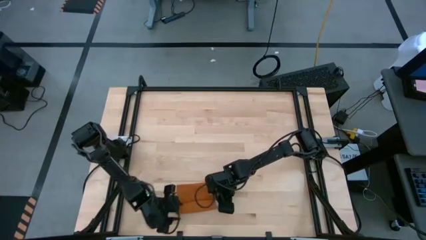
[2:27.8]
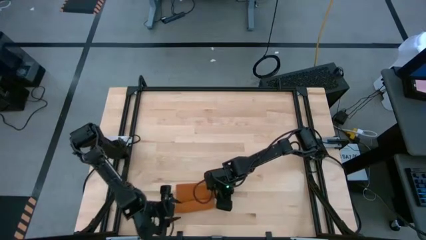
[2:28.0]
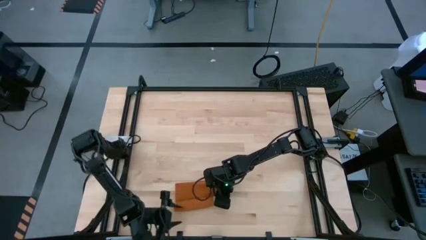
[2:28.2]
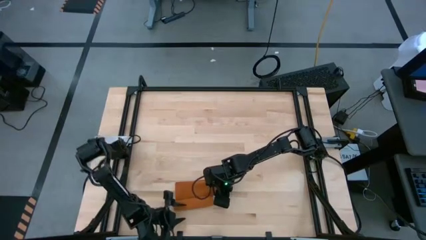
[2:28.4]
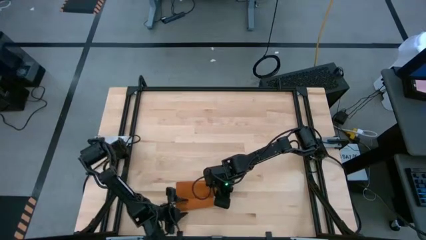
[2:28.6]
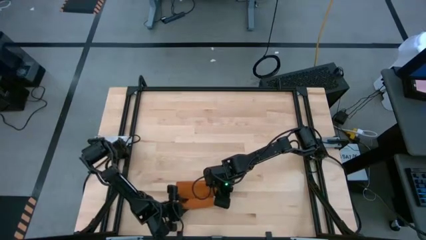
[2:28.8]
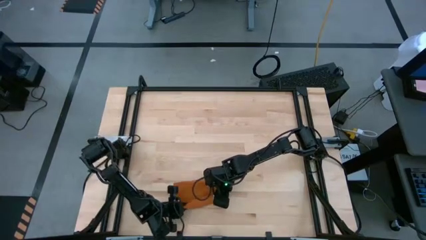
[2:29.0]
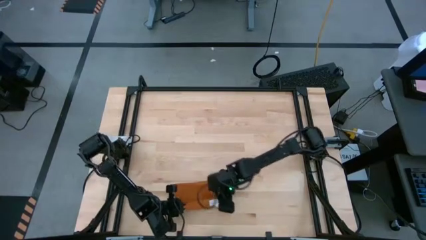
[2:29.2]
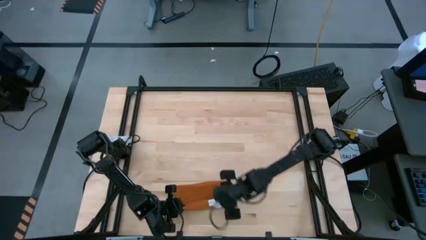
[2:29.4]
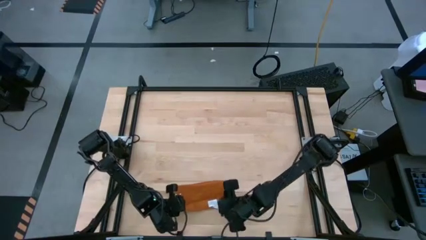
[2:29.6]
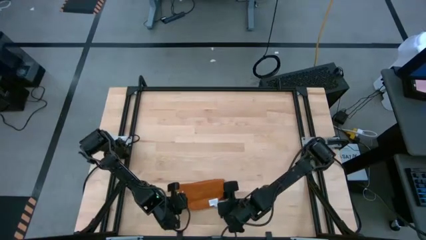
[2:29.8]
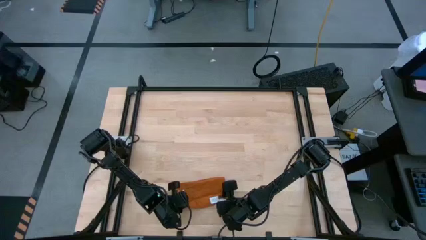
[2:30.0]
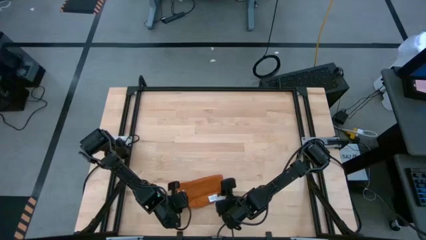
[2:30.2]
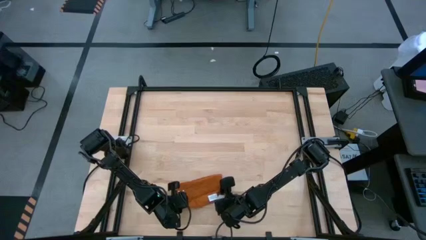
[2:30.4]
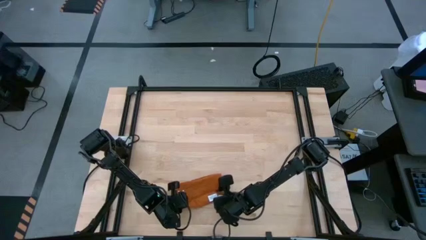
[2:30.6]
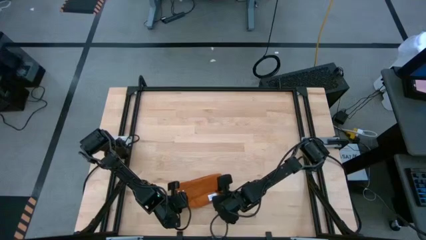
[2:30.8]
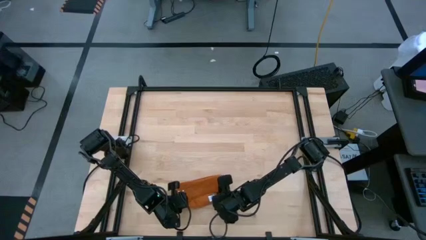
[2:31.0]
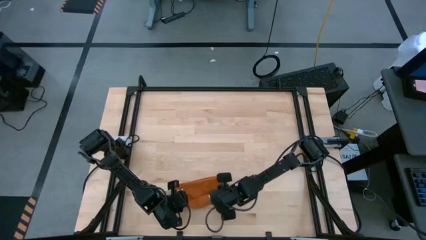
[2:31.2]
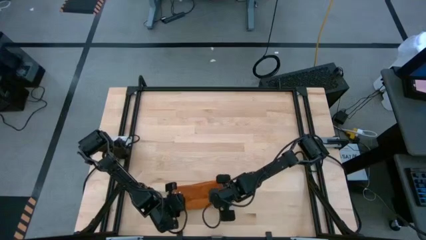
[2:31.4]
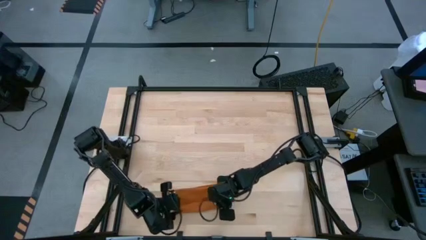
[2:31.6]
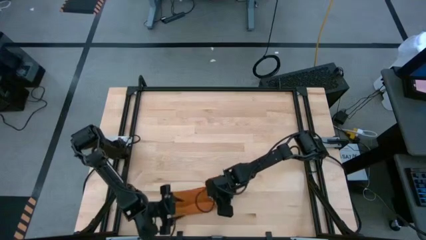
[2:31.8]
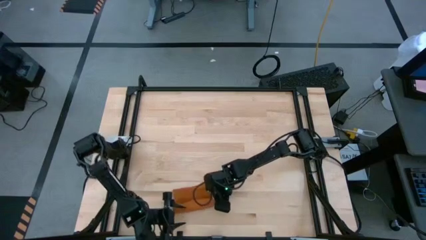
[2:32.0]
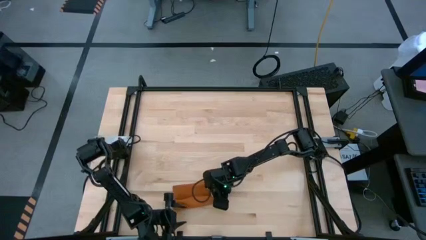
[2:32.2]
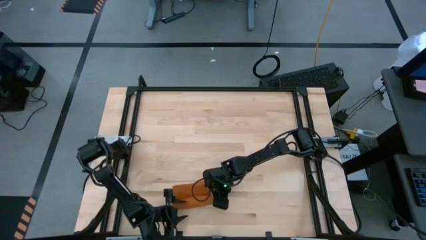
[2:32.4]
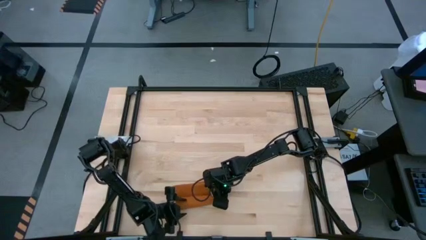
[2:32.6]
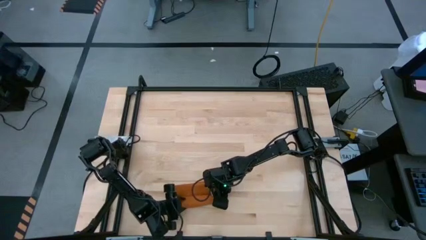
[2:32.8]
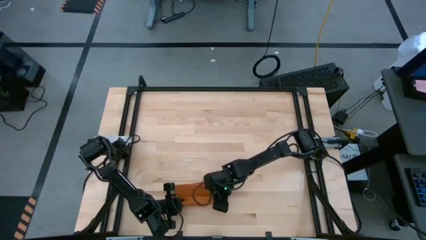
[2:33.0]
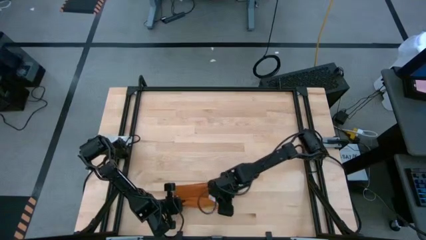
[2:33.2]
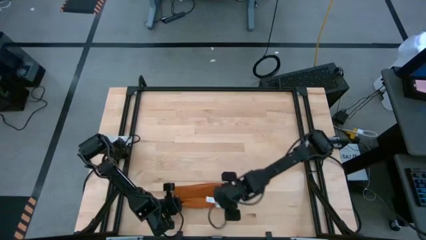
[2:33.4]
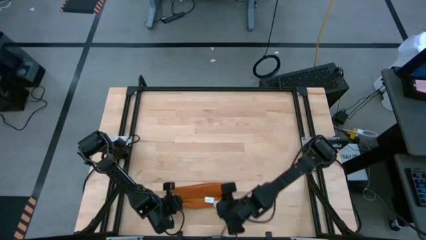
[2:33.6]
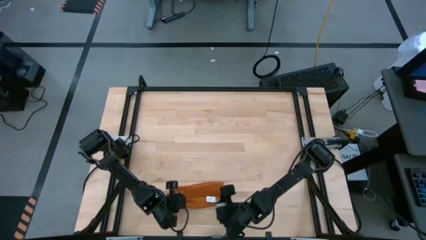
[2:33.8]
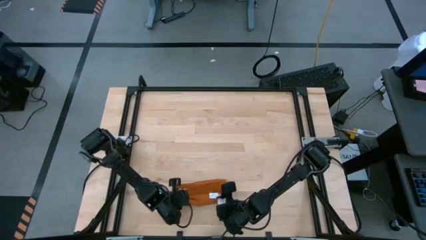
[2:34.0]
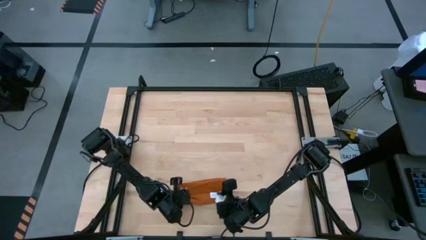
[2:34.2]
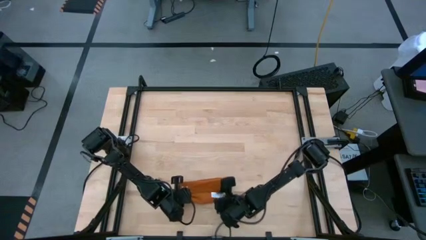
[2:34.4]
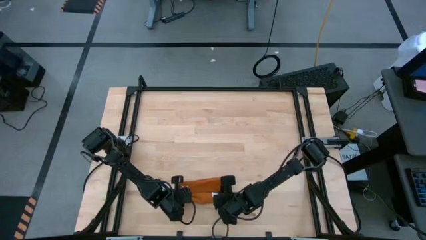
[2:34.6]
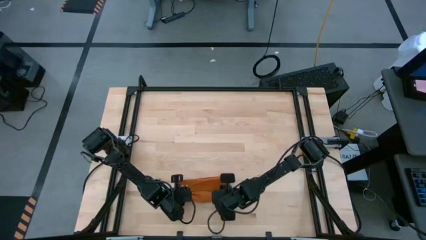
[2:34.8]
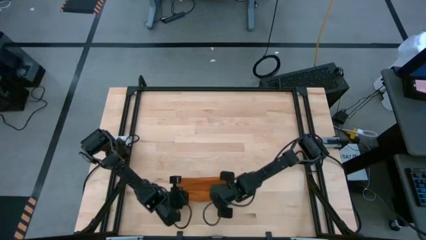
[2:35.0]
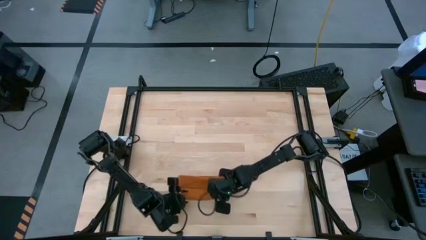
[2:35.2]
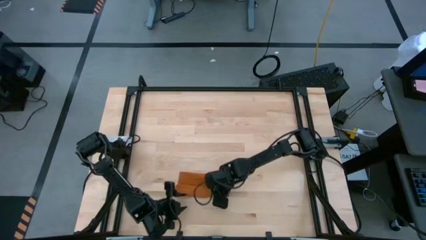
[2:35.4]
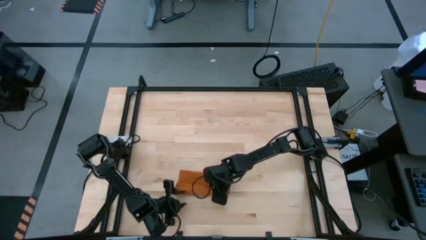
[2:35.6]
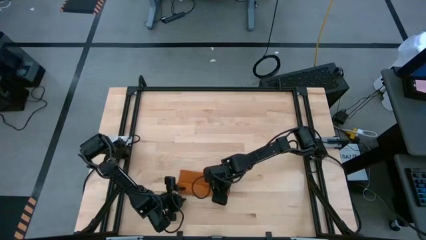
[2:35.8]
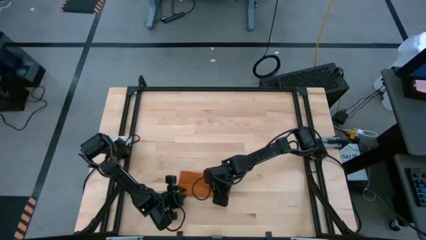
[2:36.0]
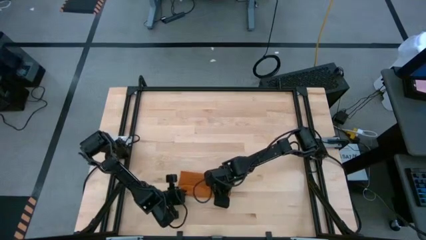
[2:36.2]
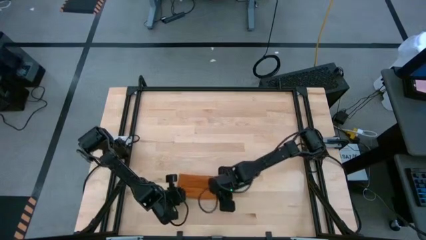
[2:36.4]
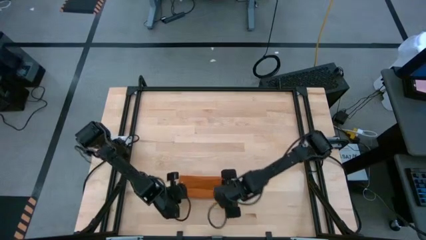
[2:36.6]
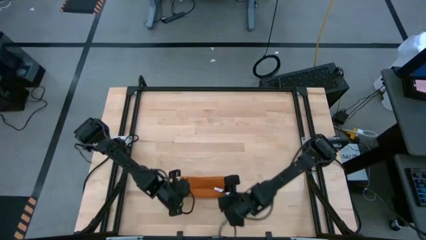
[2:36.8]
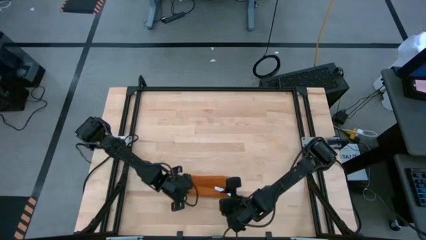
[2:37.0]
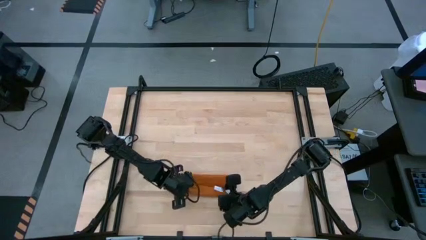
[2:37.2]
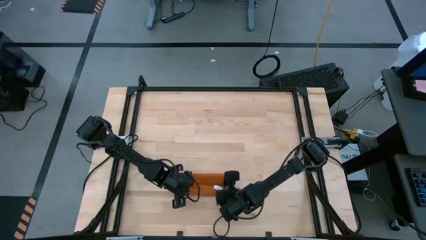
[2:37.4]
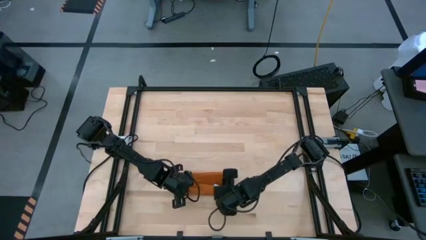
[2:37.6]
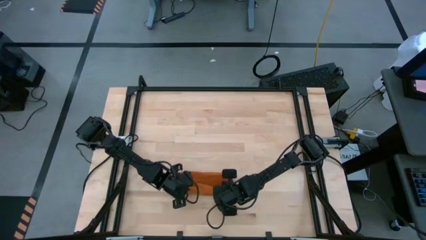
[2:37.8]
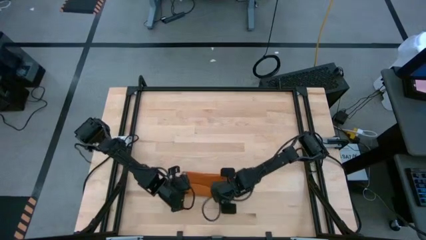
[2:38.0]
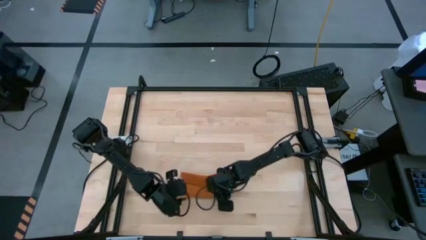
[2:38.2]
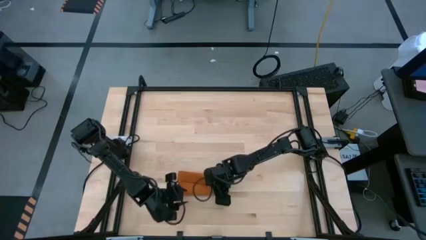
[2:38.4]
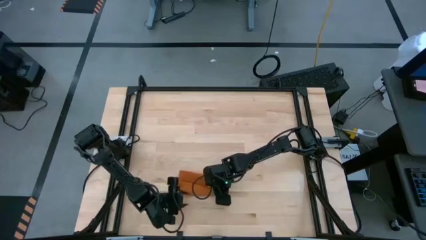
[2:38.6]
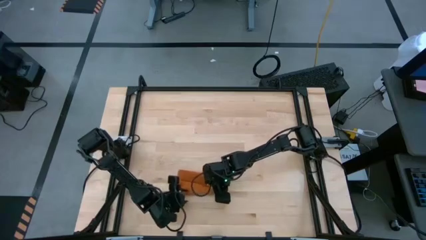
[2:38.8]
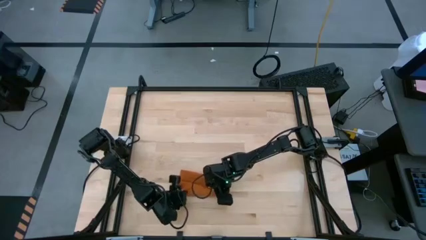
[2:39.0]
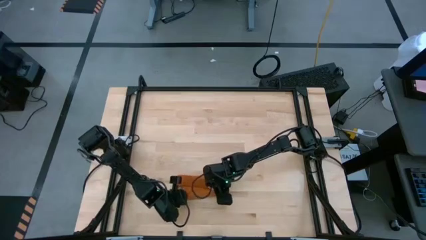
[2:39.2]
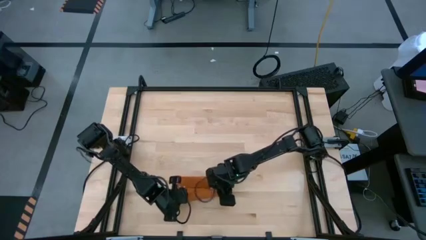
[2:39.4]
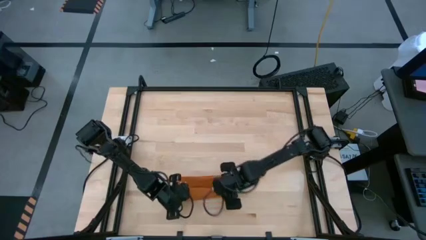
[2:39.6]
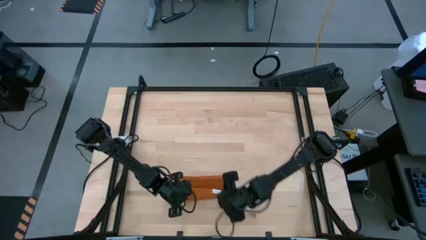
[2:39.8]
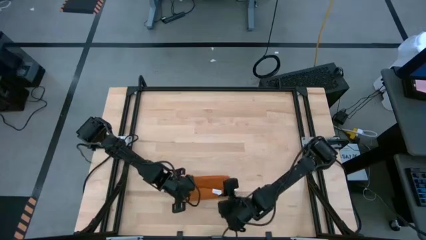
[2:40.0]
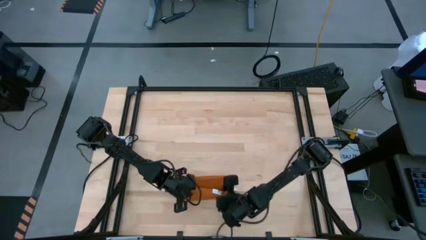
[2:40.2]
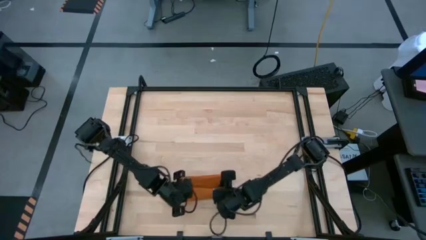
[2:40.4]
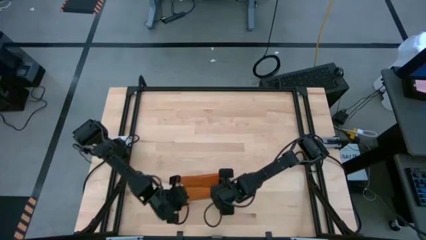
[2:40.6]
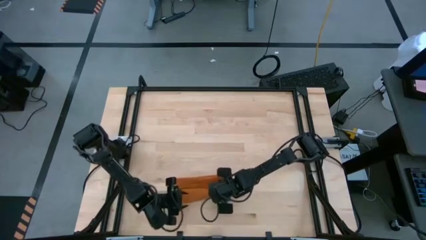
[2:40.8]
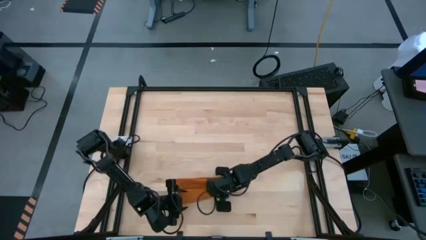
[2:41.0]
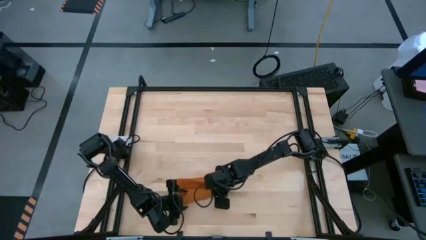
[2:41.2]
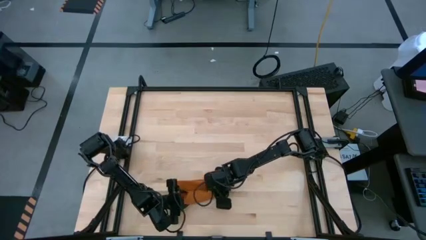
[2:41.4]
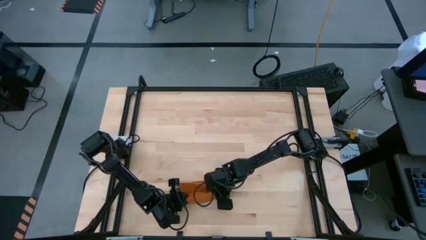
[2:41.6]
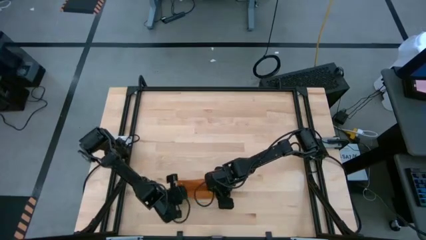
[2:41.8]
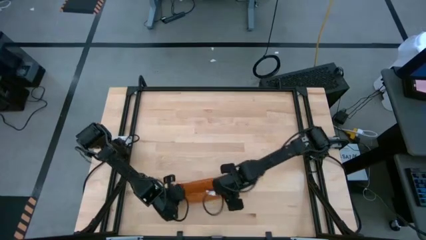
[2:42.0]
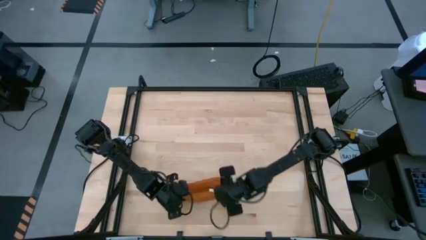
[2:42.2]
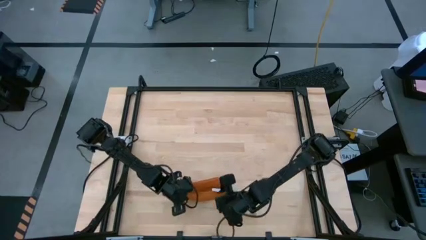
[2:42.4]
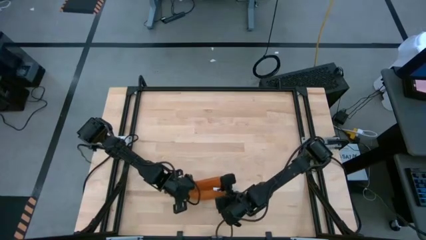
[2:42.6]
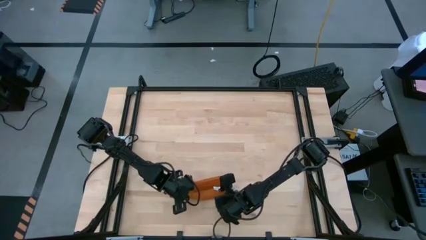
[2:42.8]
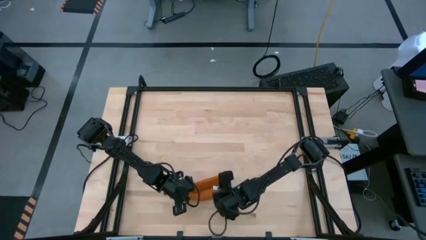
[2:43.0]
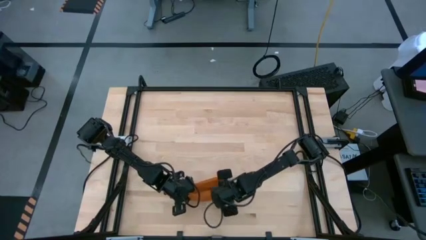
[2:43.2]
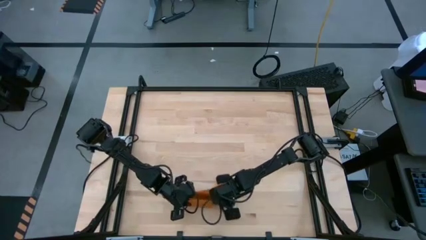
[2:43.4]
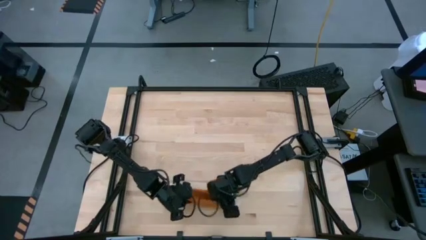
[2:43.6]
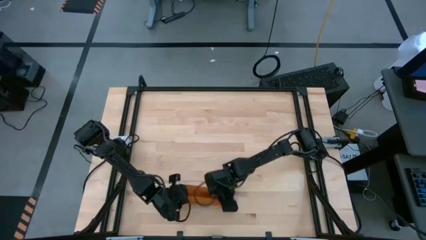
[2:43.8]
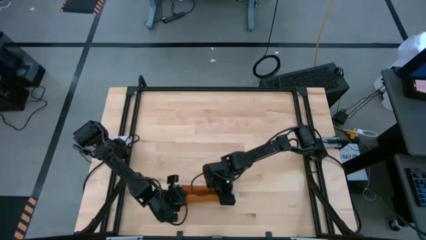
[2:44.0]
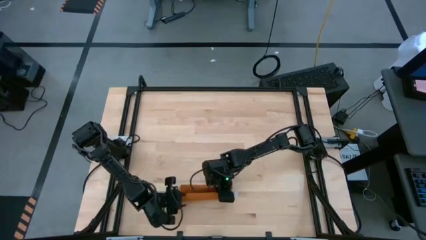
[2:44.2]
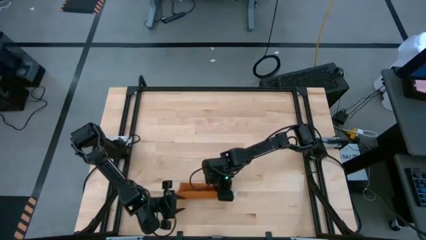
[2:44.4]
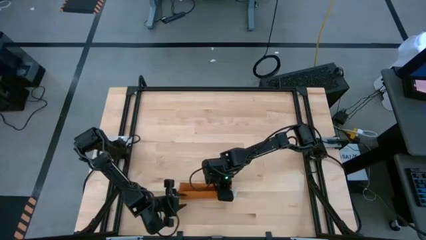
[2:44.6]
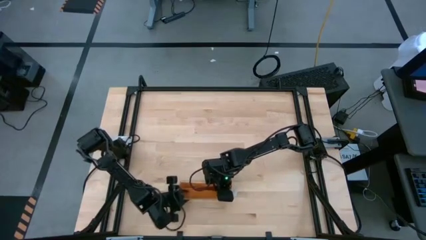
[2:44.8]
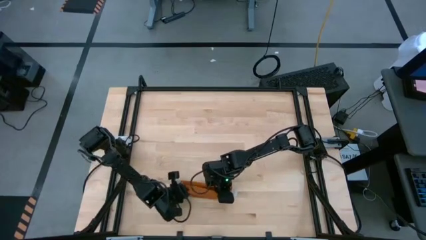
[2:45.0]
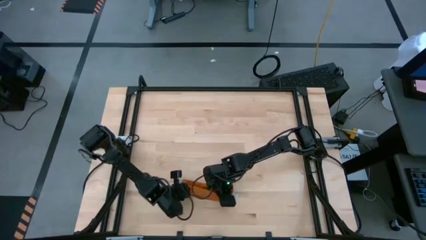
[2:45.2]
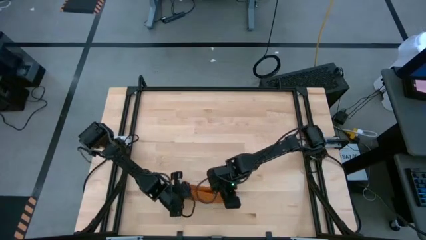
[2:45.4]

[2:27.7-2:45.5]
Task: Roll towel
Roll the brown towel
